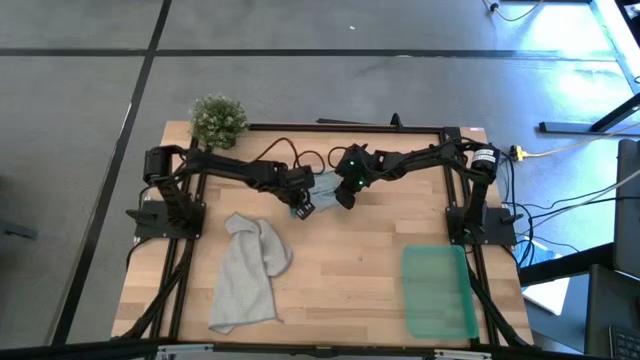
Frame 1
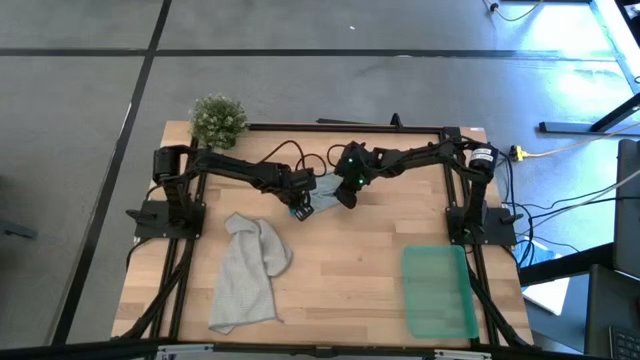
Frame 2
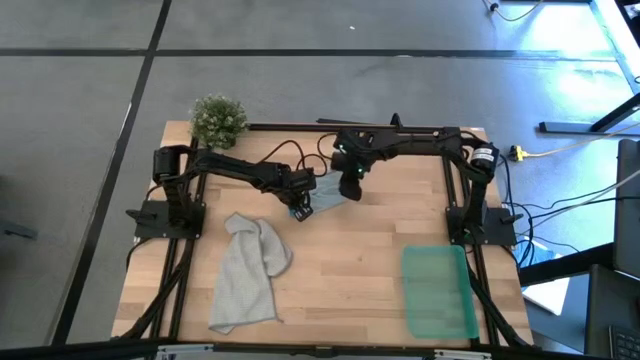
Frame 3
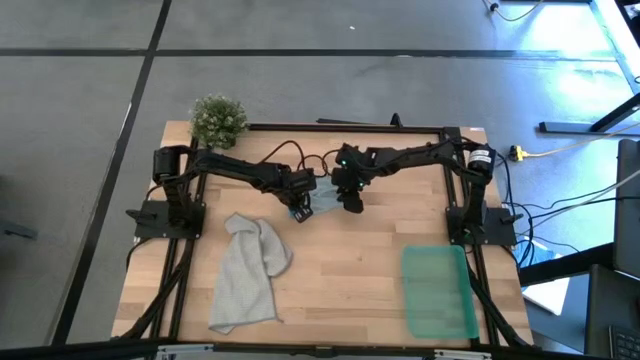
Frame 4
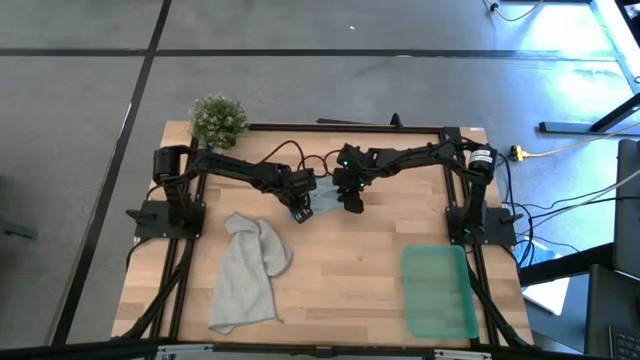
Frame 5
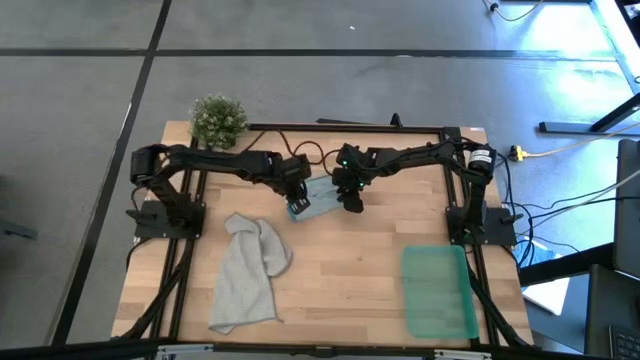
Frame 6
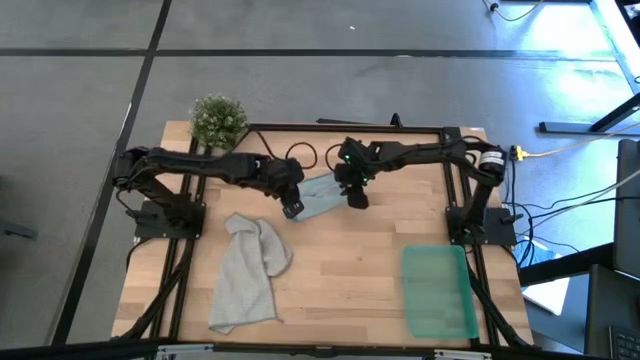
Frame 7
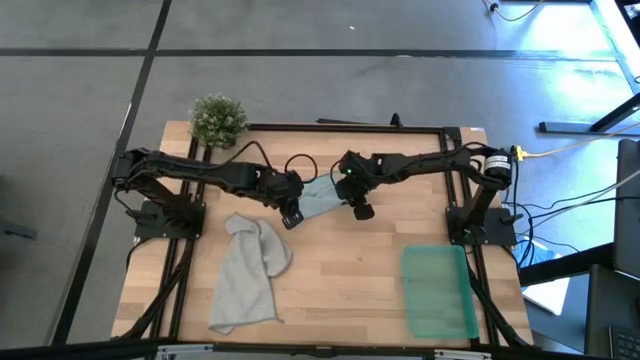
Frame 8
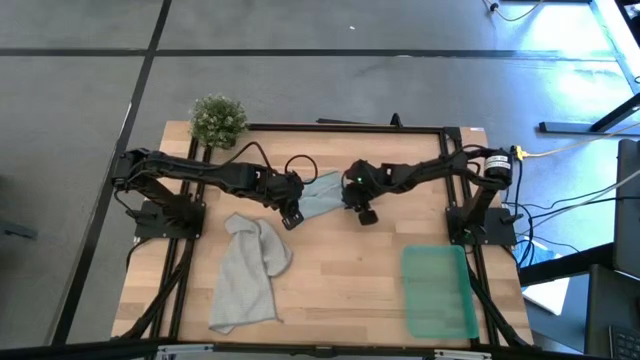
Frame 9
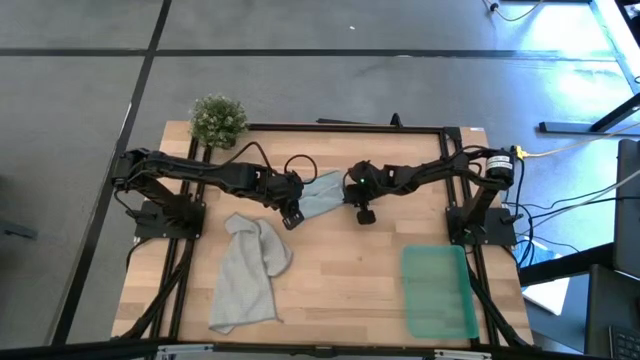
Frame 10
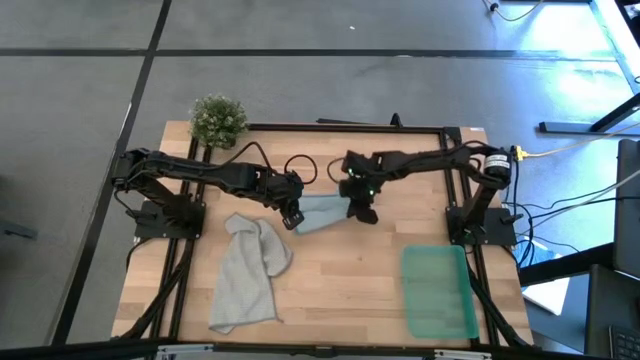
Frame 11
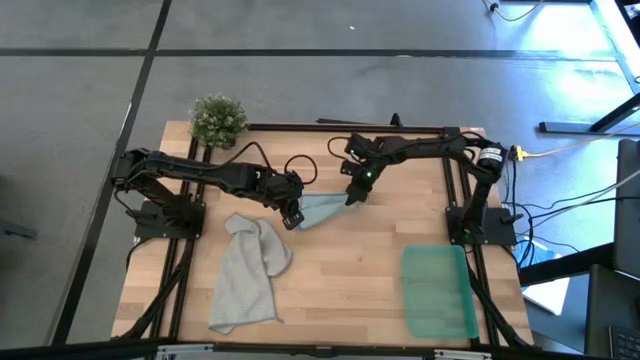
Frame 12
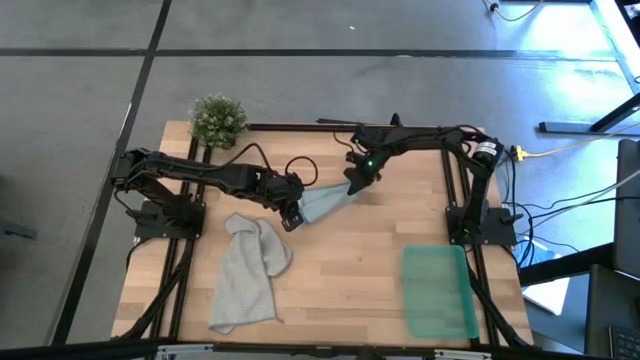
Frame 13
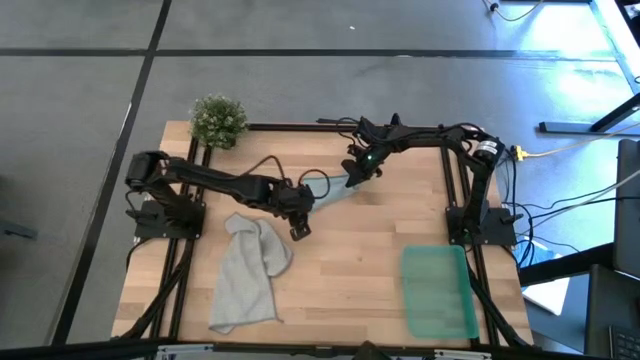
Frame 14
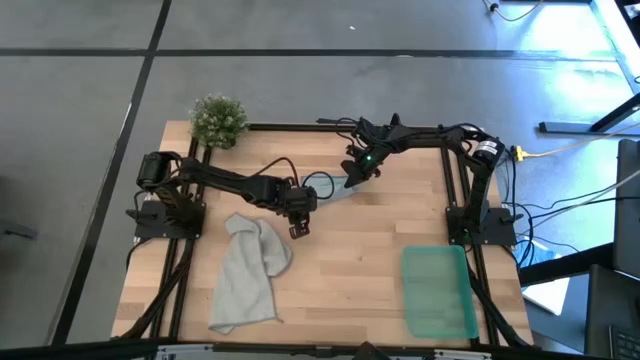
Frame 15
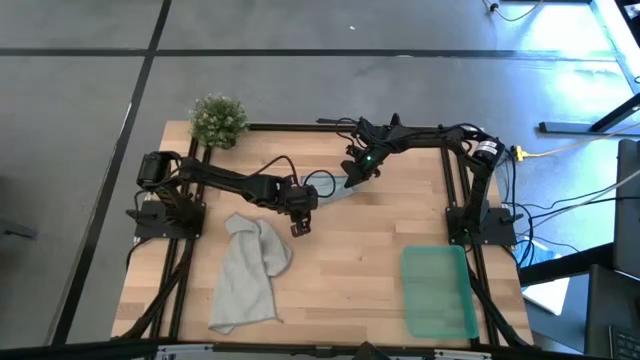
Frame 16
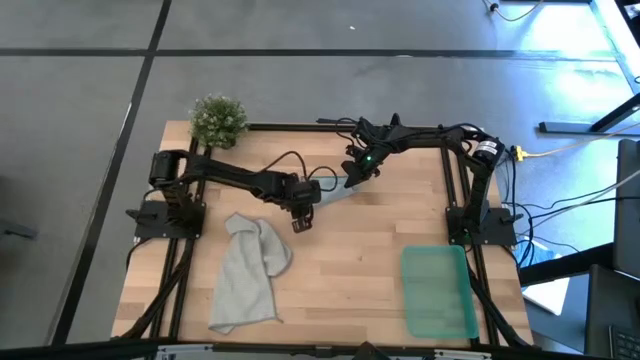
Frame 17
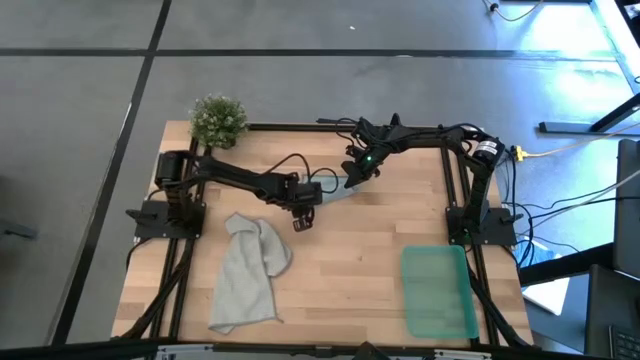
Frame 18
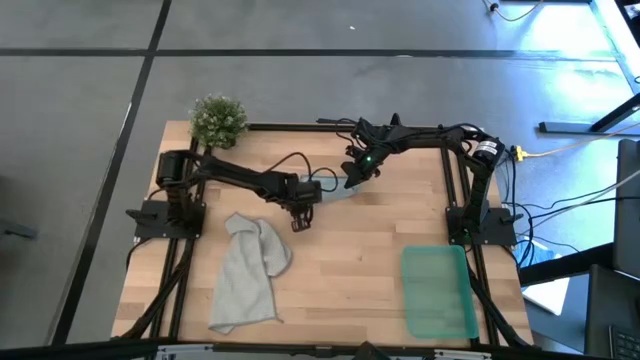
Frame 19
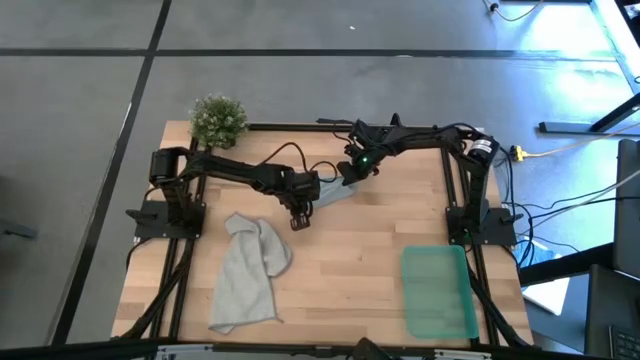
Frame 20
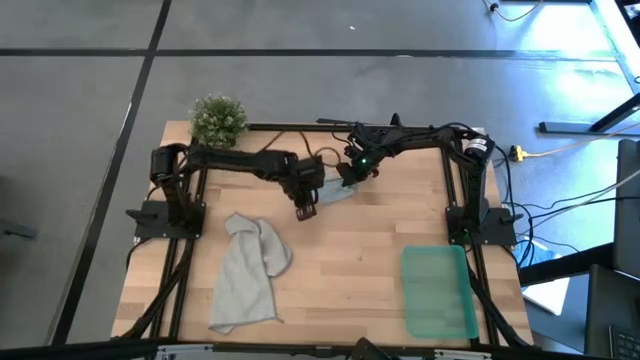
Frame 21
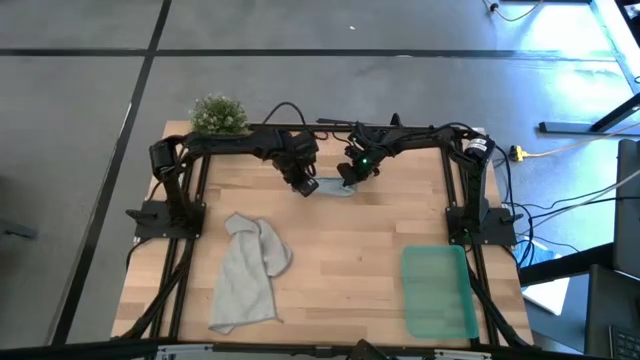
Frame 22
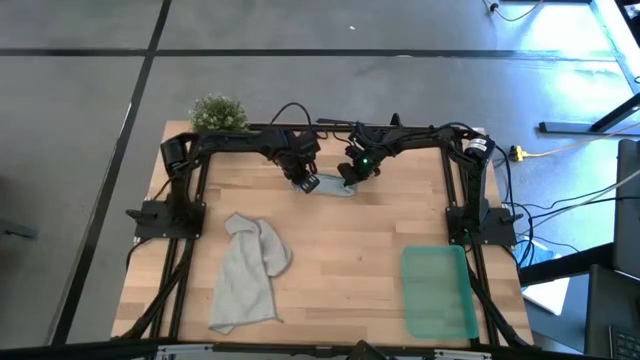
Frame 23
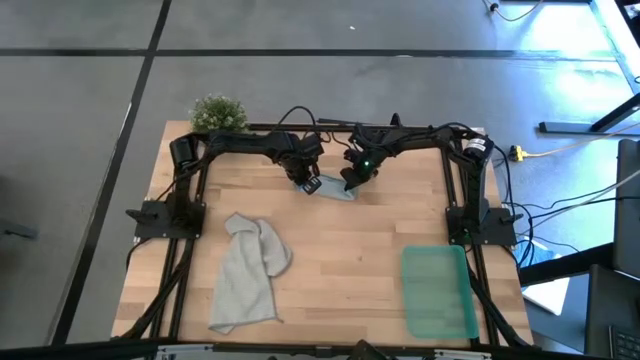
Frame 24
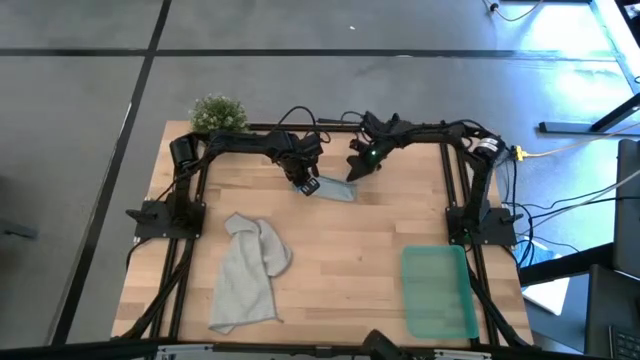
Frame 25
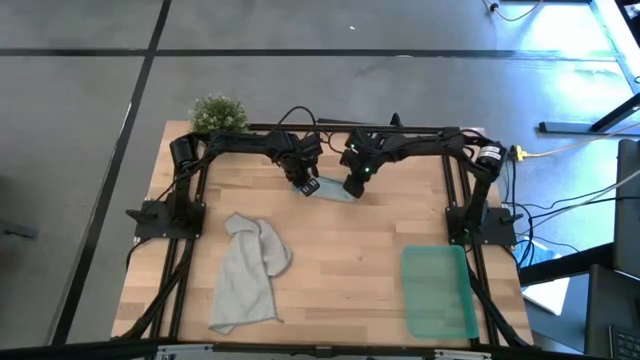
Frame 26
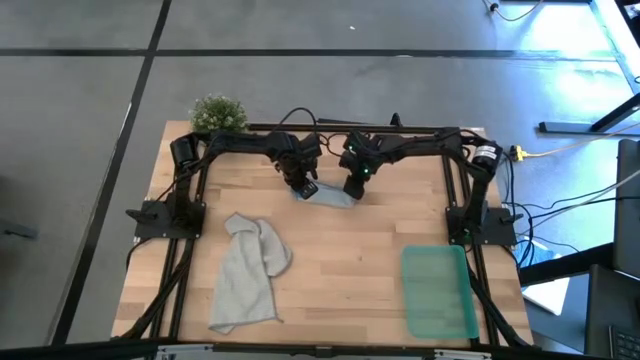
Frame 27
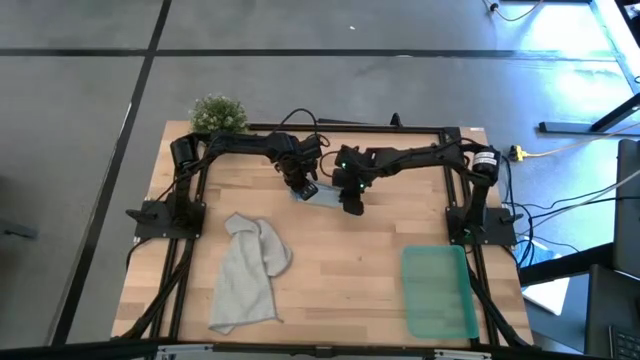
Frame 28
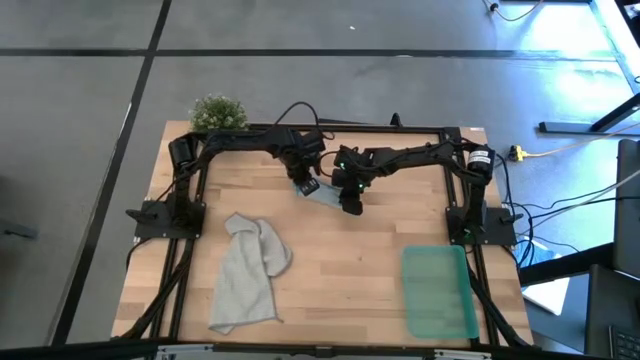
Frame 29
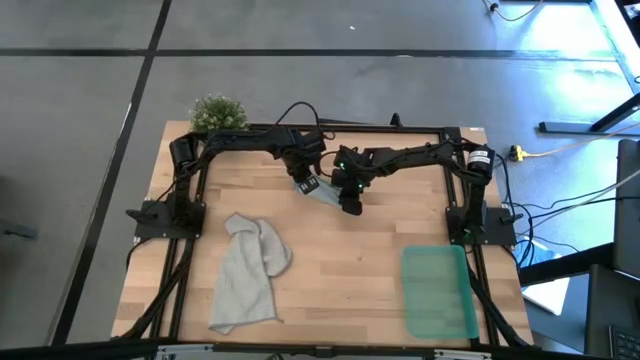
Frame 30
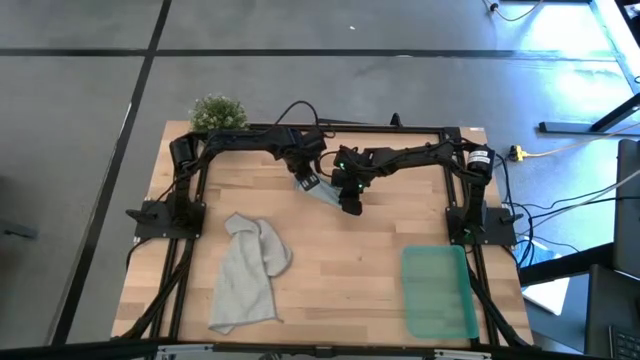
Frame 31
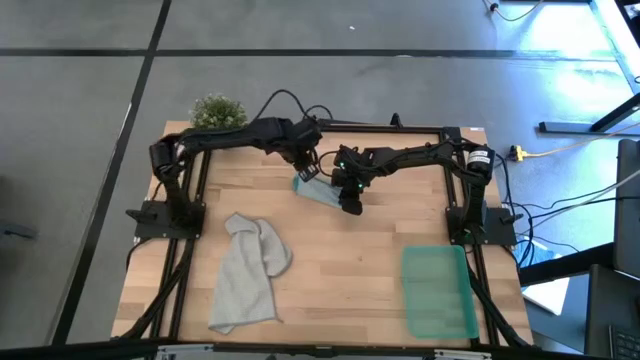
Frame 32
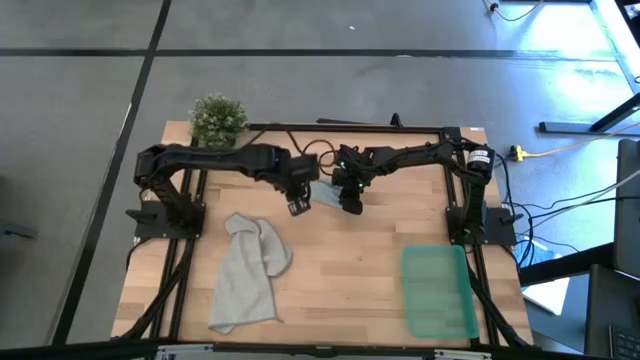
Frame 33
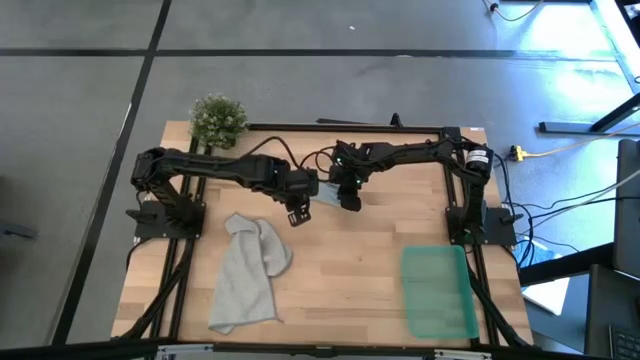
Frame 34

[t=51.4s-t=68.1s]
Task: Roll microfiber towels into tight, uniform cylinder then place into a basket
Roll the blue towel

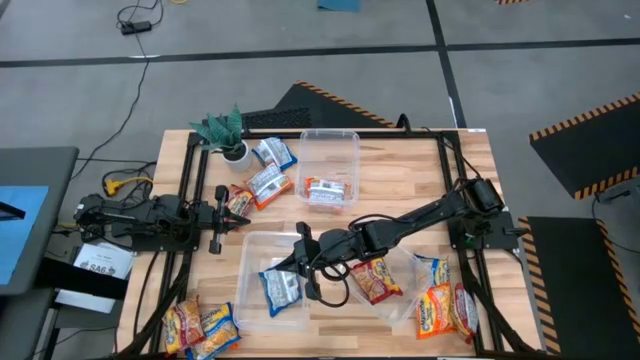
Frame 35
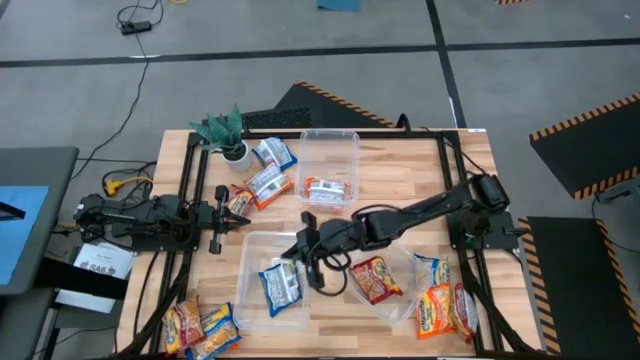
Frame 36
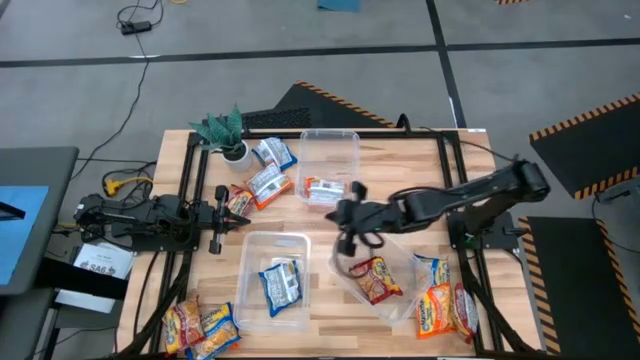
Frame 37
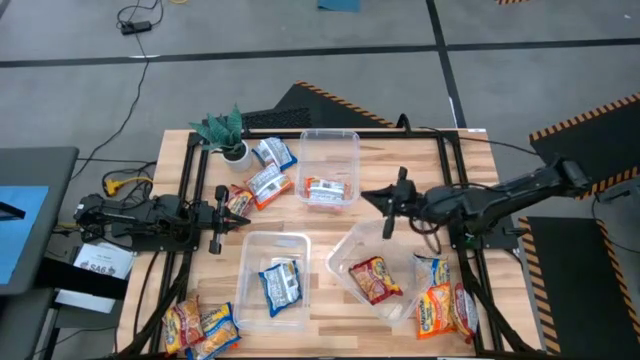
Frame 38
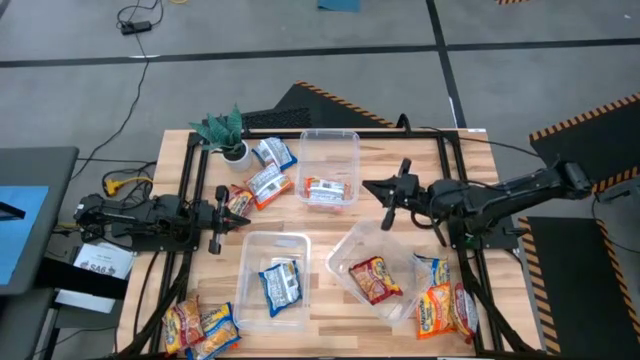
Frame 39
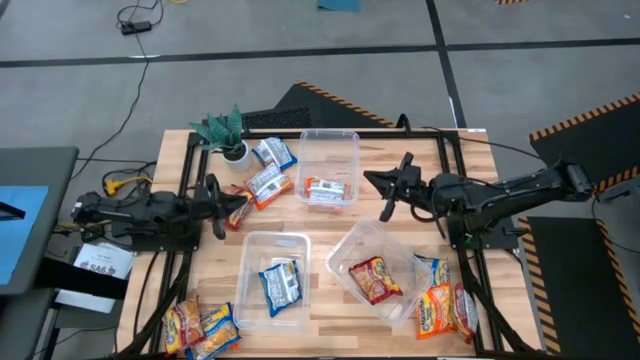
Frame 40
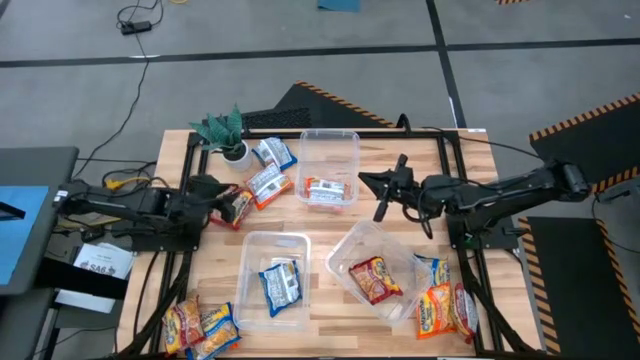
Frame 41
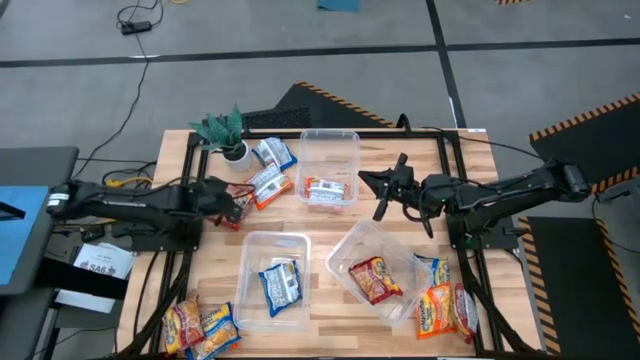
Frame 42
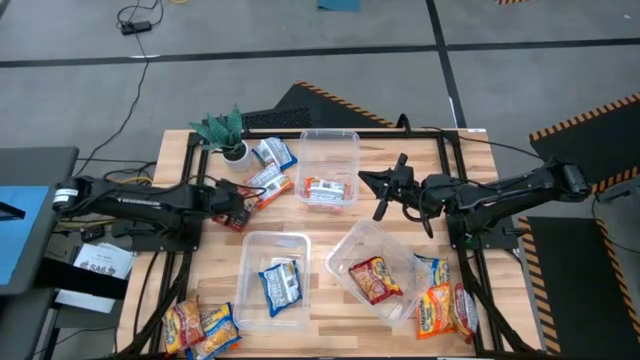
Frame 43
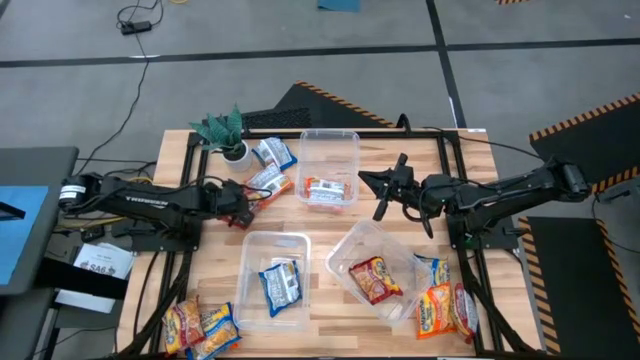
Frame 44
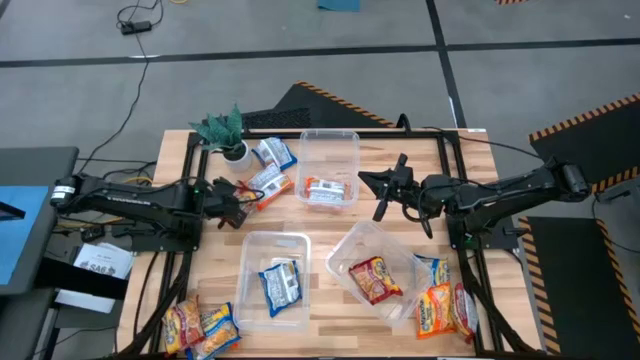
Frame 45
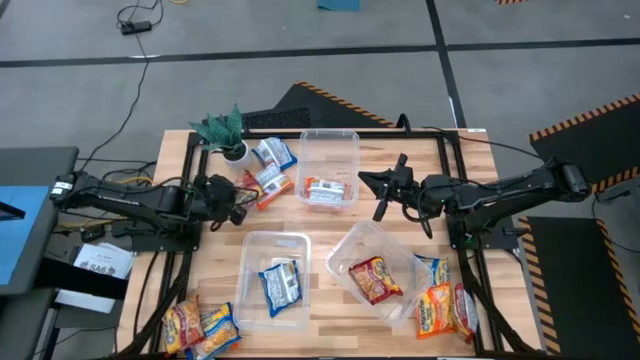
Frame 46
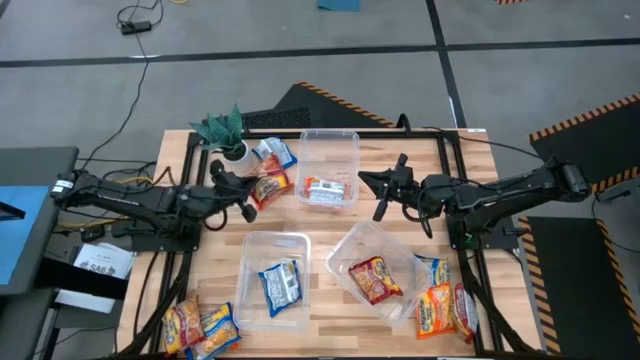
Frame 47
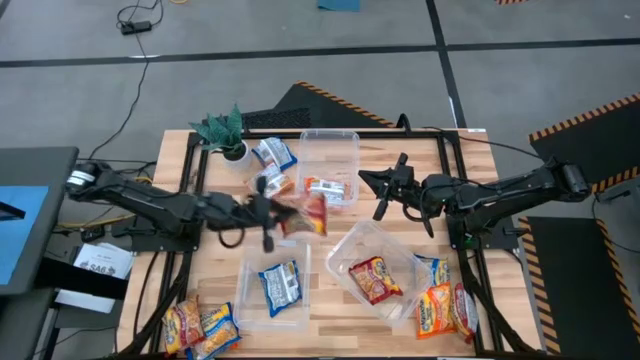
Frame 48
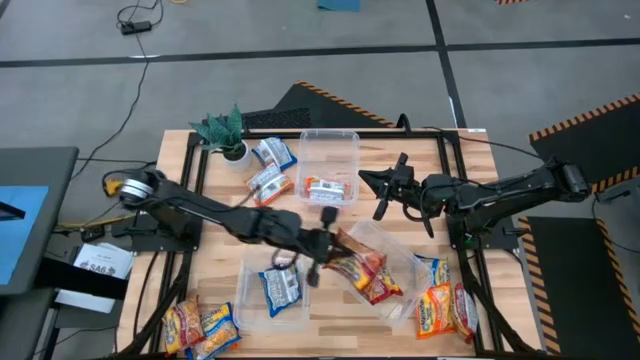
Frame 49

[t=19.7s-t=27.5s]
Task: Sort Maruchan noodles
Put the red noodle pack into the bottom right transparent bin
